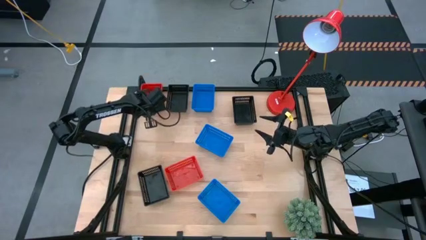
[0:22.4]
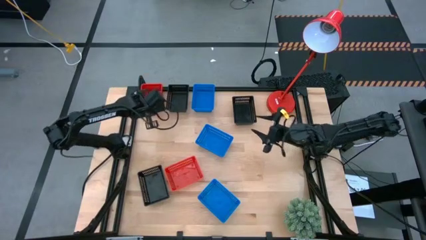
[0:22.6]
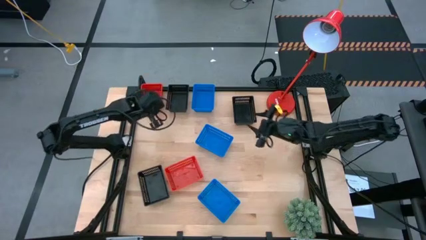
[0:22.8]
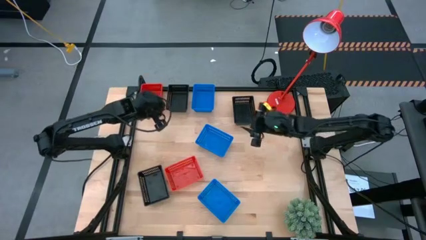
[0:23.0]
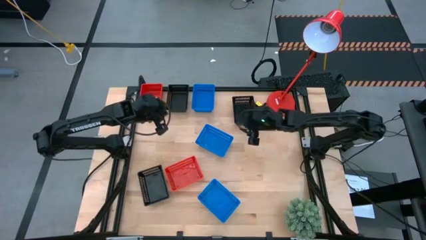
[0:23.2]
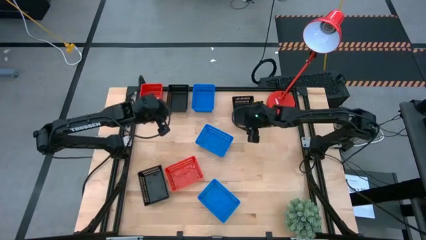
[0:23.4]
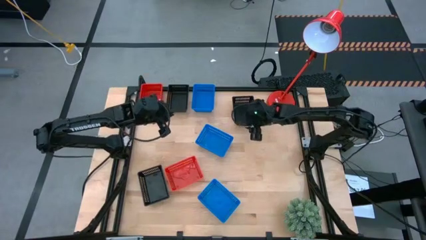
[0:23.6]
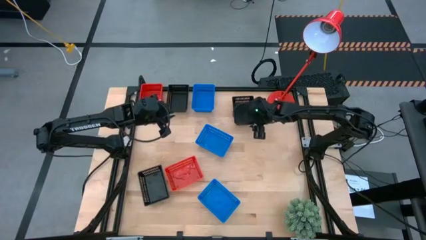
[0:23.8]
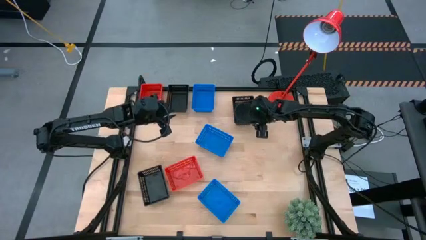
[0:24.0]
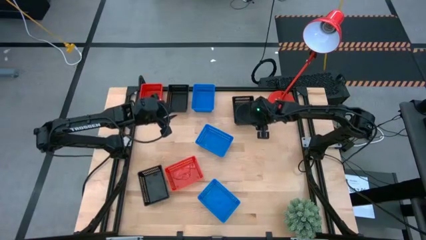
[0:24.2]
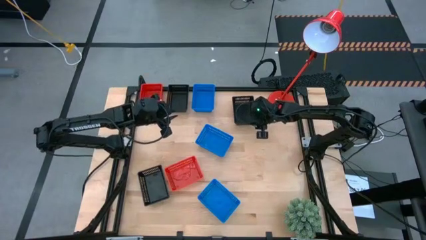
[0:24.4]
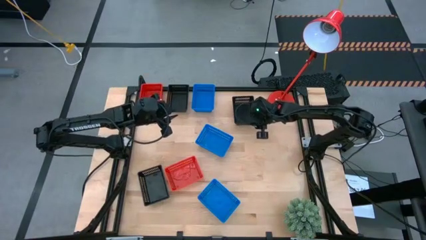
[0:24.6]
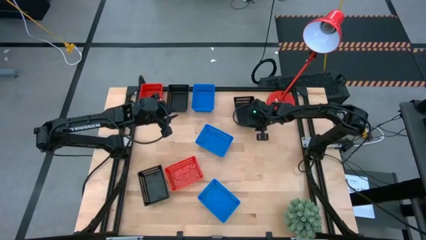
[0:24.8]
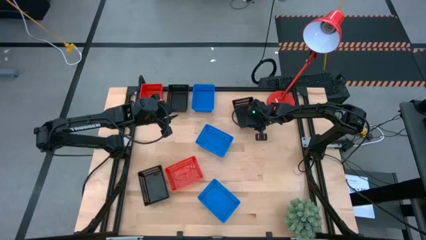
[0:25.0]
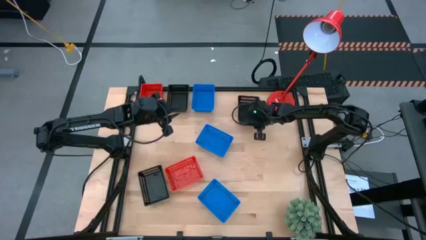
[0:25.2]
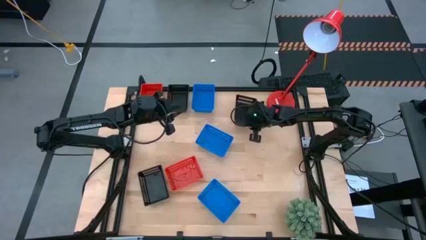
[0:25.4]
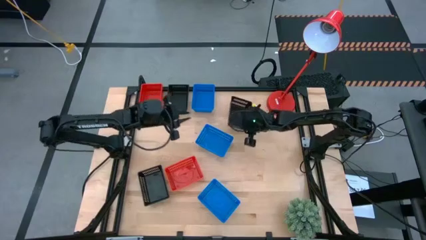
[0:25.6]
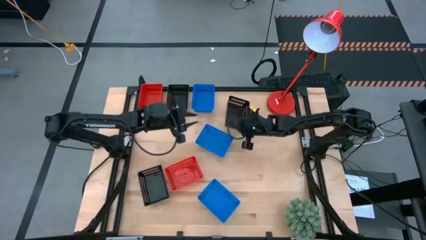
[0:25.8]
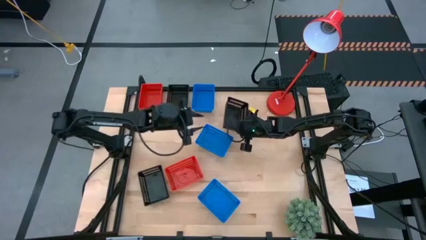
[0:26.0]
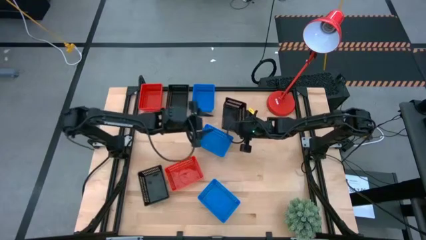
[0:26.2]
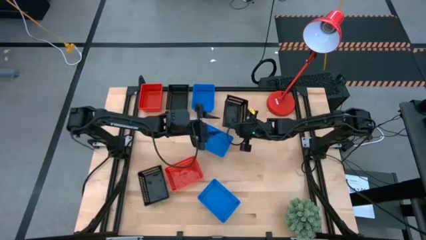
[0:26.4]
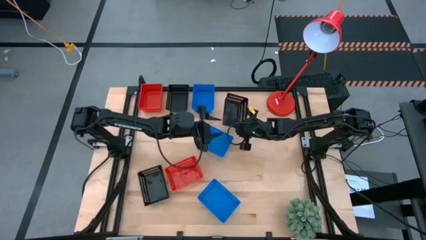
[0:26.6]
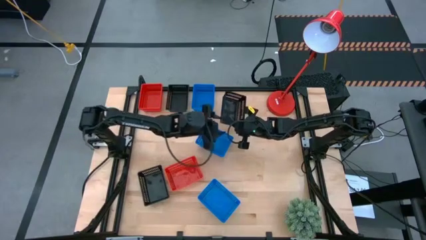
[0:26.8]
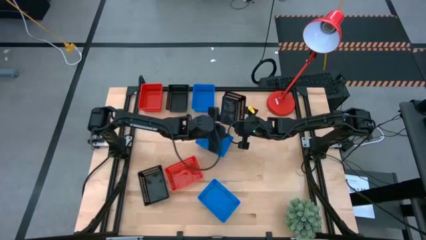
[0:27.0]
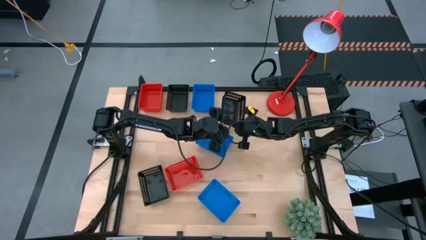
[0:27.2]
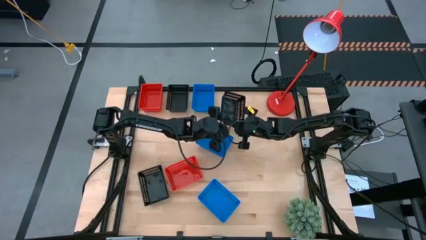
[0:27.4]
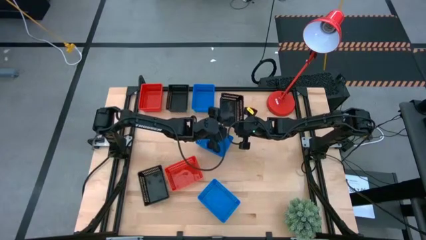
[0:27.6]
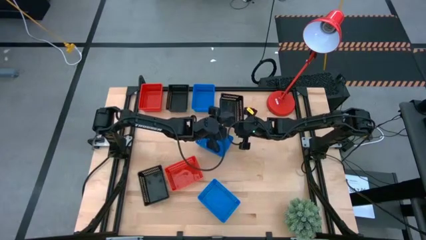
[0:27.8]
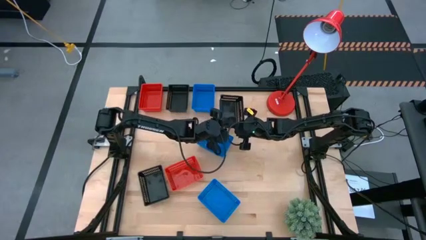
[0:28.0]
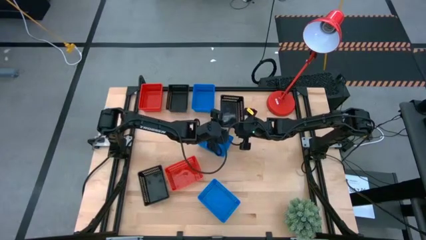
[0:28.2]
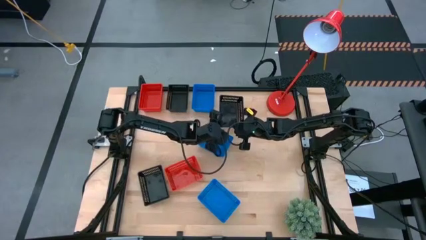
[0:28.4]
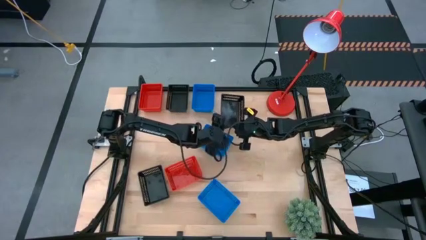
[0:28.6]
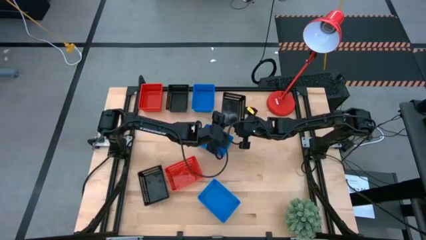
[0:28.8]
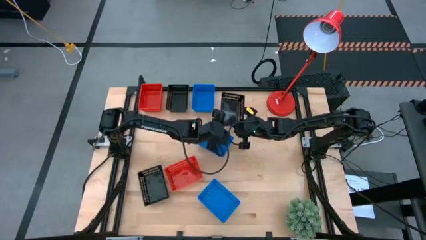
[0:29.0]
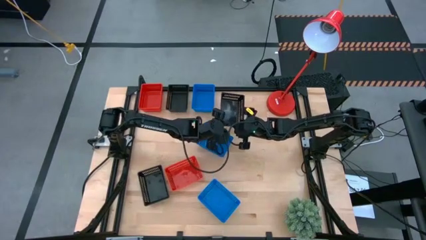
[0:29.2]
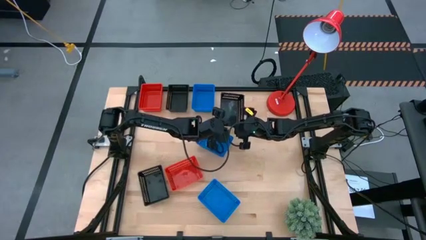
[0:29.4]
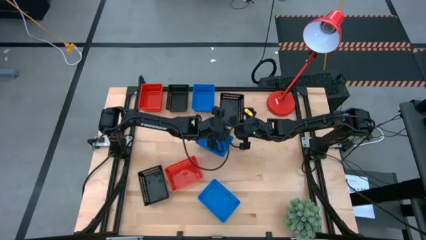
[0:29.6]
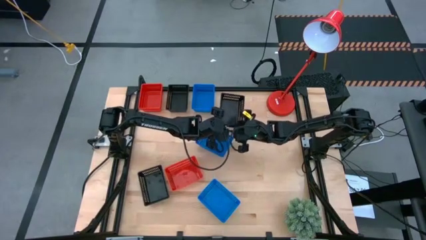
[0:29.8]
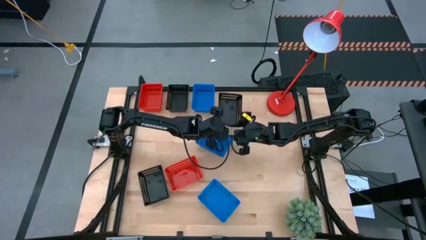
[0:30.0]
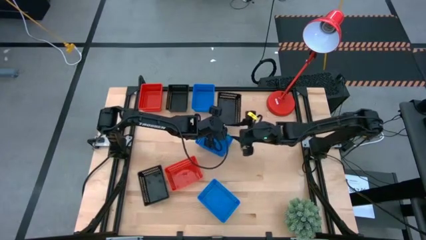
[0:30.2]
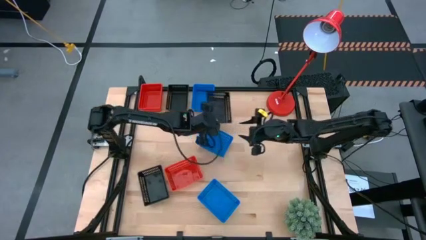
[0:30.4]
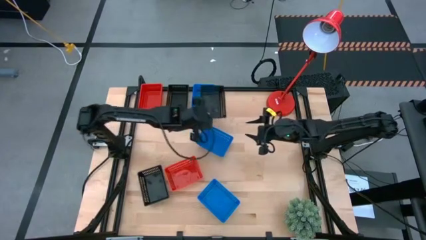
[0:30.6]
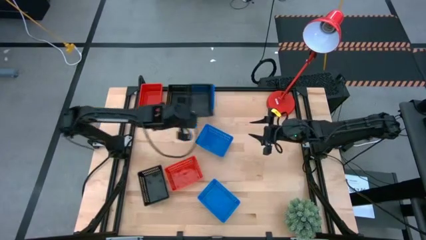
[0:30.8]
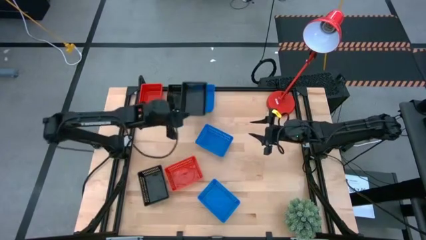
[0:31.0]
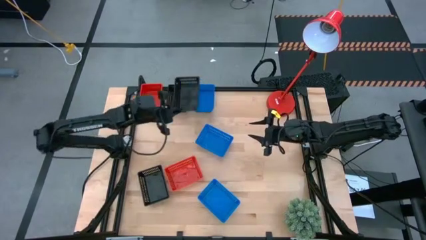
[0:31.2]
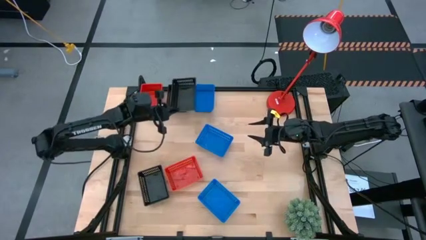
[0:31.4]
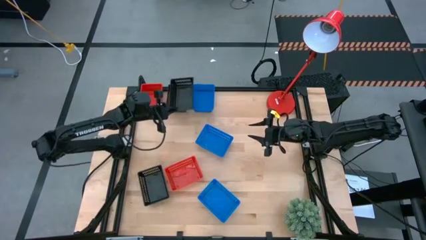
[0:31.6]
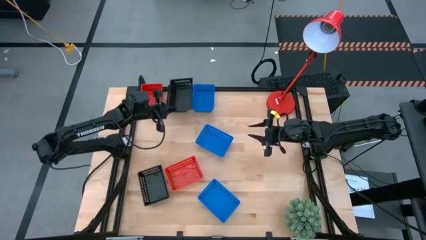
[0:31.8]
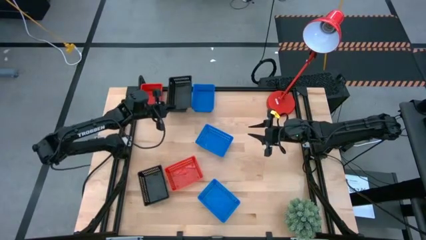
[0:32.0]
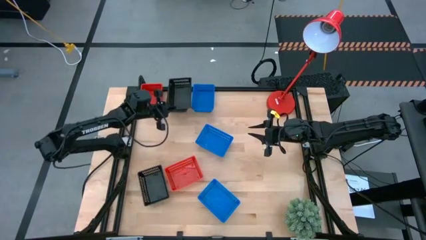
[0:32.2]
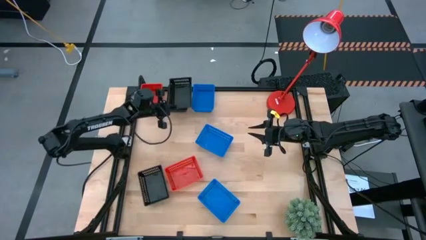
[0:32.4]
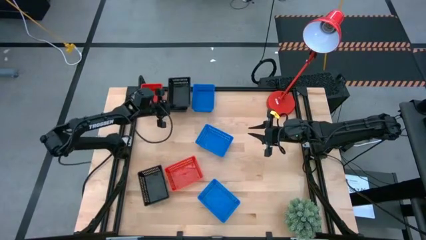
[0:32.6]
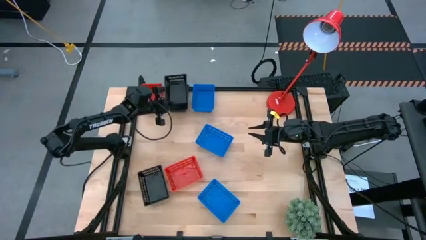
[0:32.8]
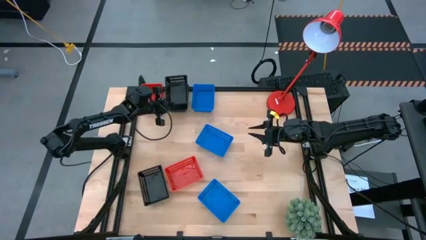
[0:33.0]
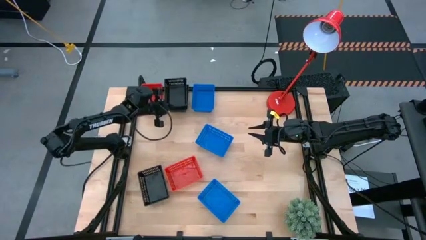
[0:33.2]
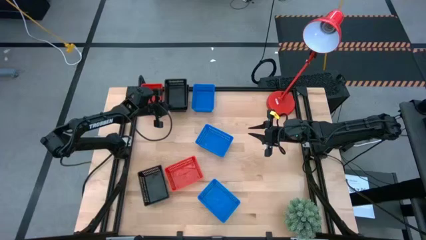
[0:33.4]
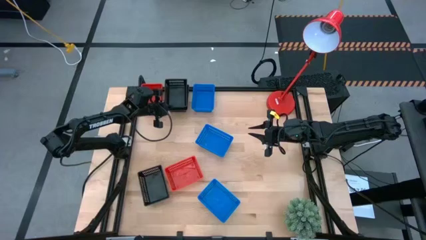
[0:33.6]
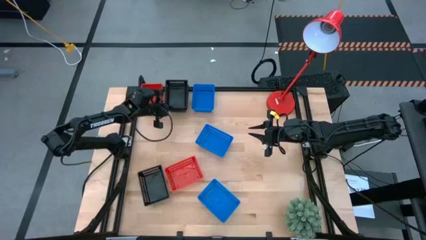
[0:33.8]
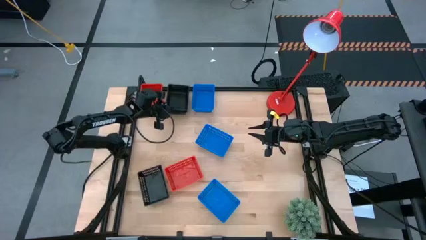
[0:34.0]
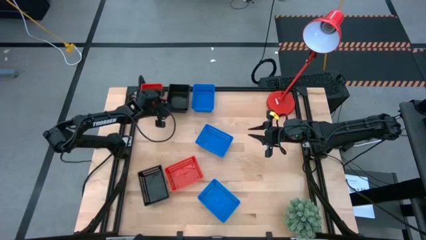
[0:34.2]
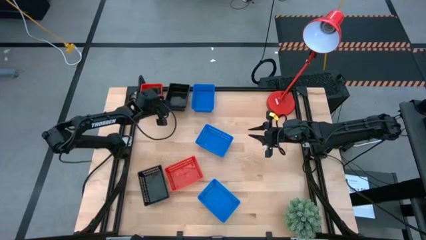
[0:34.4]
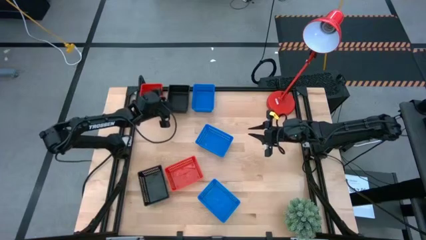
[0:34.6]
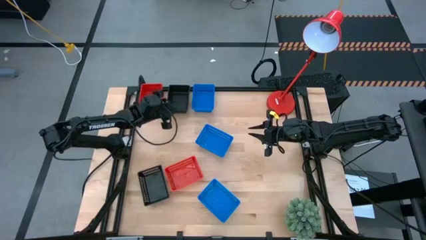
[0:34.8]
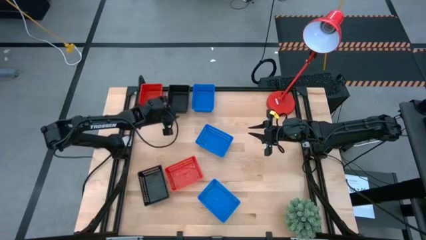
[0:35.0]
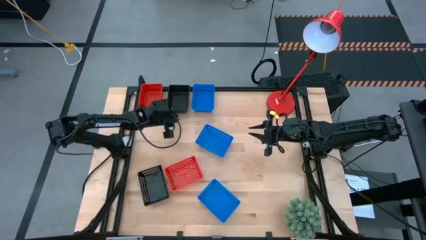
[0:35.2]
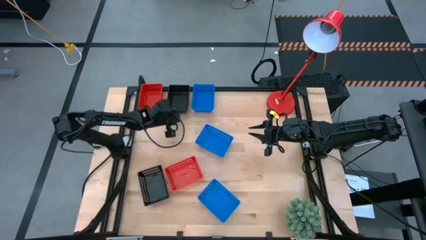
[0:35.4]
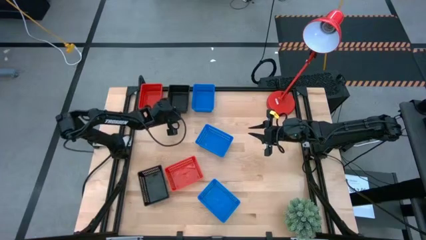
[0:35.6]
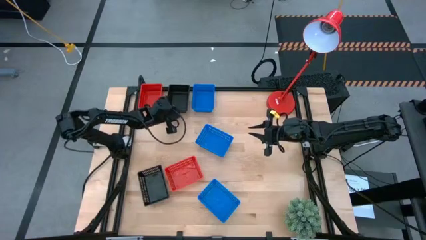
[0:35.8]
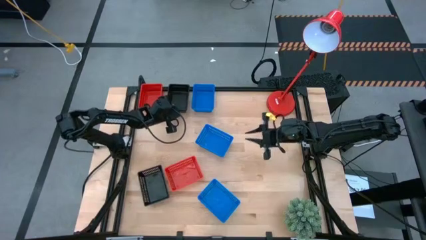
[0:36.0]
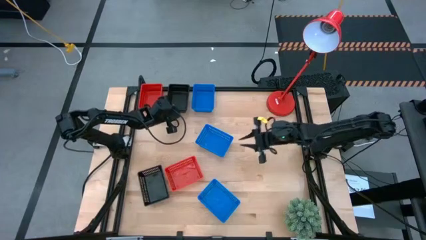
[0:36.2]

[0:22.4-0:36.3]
Stack the right black bin on top of the top black bin

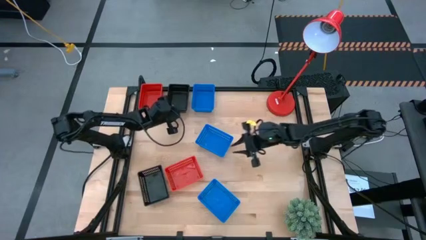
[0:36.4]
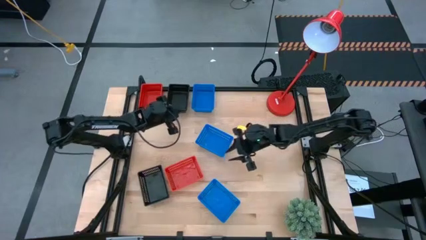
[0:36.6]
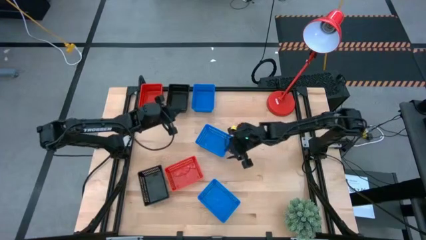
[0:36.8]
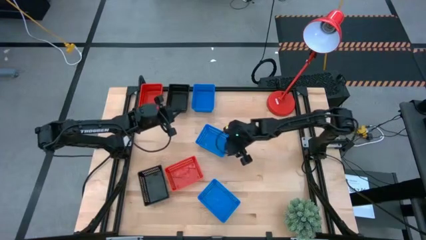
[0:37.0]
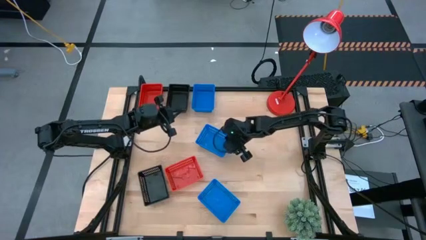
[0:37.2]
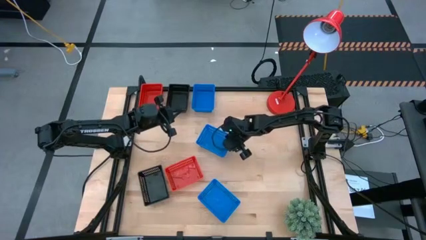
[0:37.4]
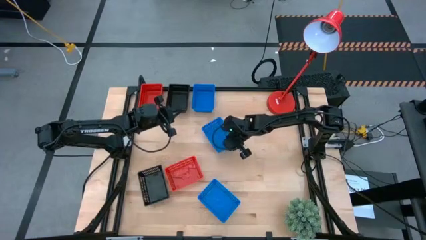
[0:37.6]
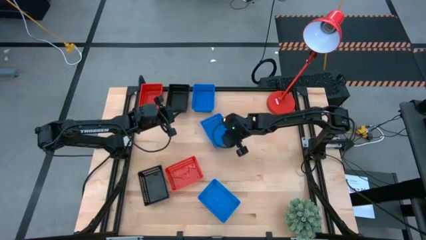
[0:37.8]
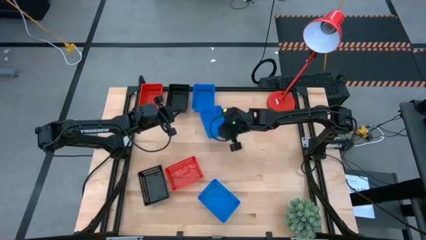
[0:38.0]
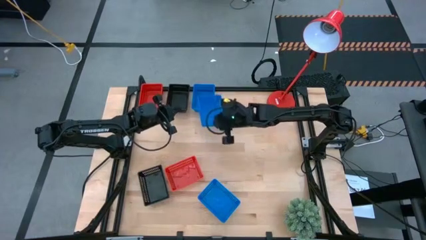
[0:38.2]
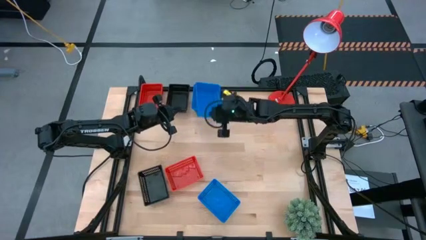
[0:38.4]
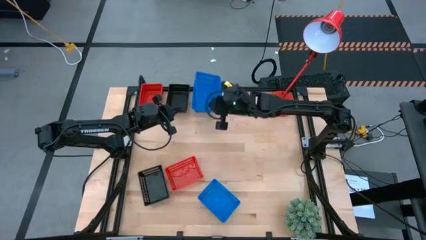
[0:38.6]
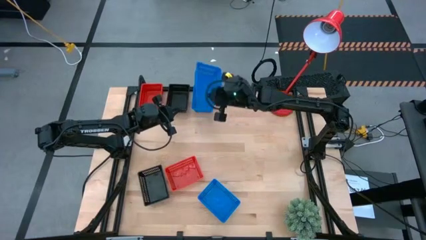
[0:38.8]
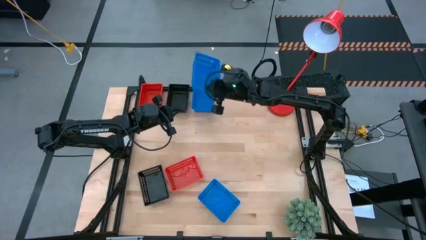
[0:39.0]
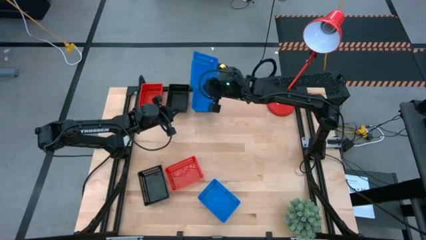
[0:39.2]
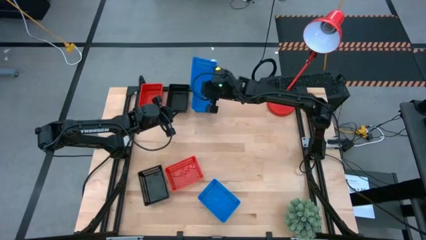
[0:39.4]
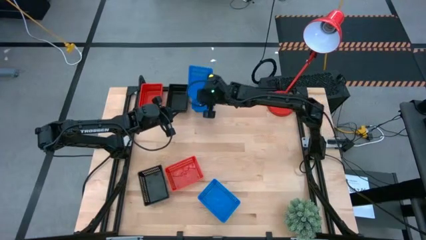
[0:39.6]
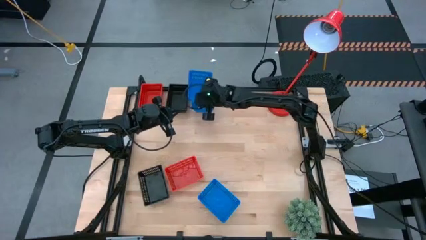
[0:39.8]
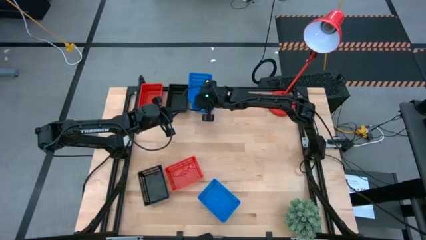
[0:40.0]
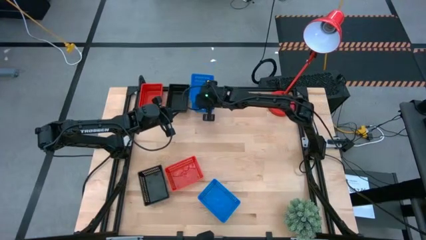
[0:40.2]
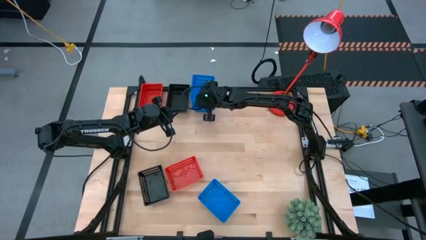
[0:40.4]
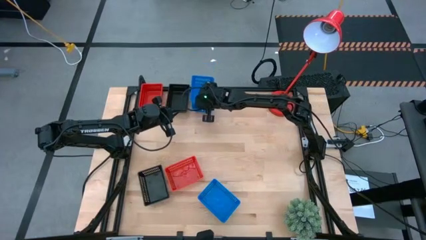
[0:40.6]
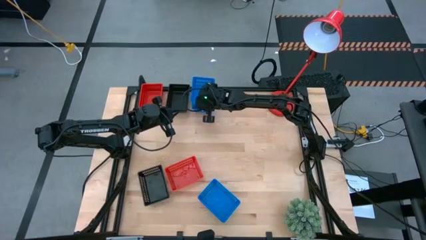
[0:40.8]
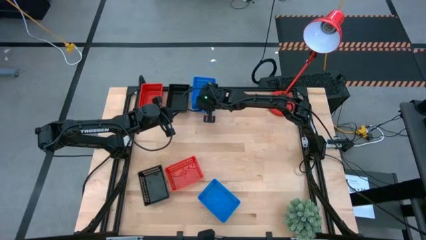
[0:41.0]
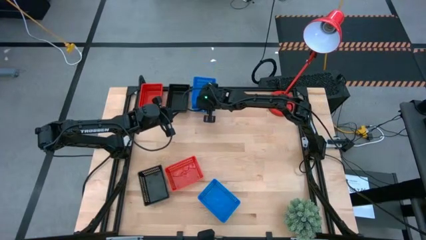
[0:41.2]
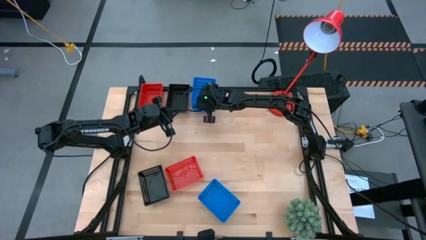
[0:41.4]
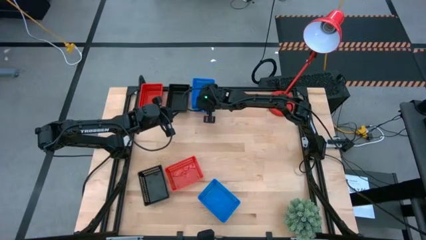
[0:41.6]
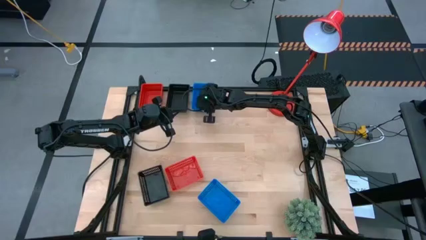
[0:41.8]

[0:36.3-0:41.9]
Stack the middle blue bin on top of the top blue bin
